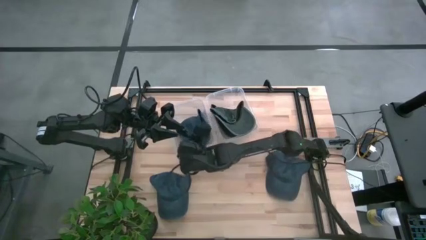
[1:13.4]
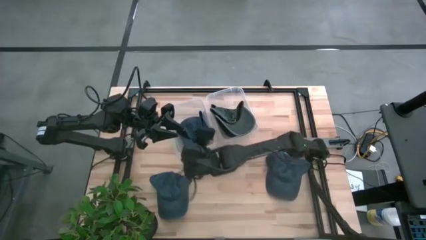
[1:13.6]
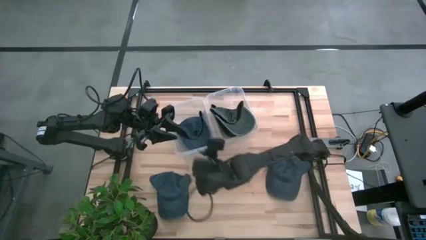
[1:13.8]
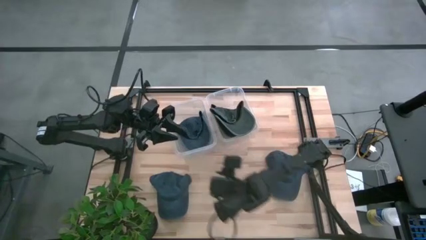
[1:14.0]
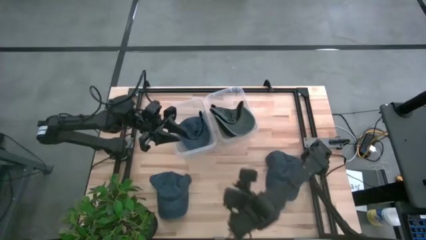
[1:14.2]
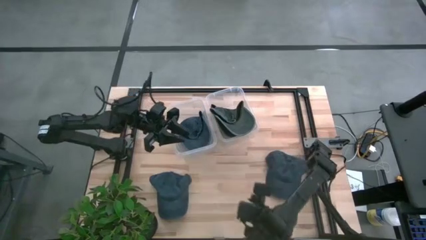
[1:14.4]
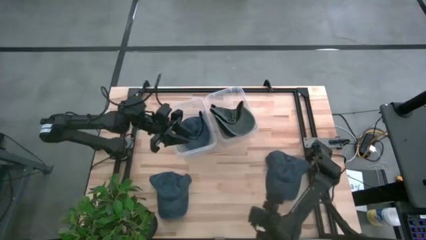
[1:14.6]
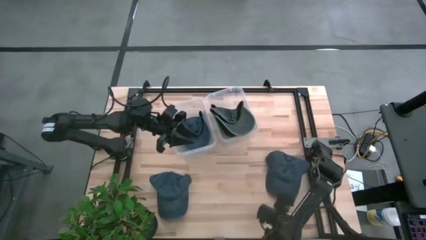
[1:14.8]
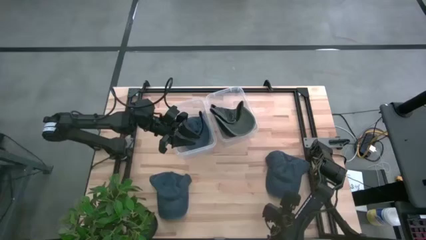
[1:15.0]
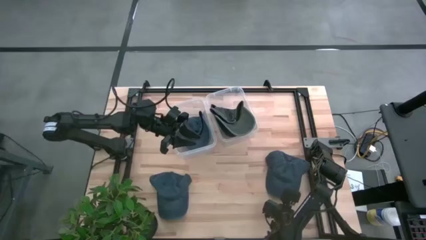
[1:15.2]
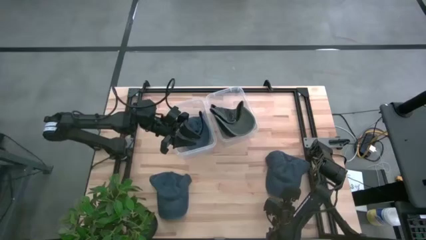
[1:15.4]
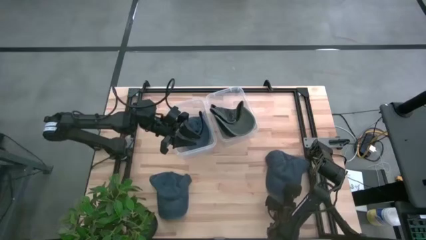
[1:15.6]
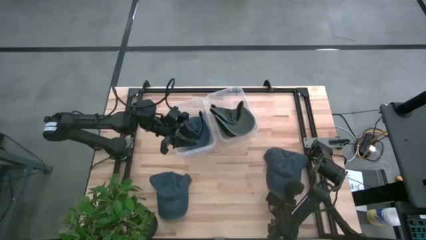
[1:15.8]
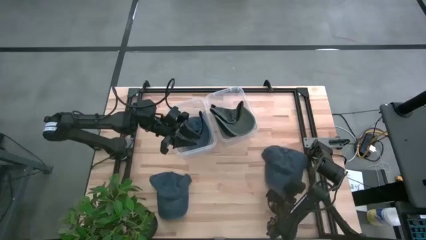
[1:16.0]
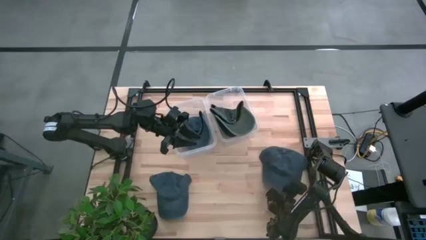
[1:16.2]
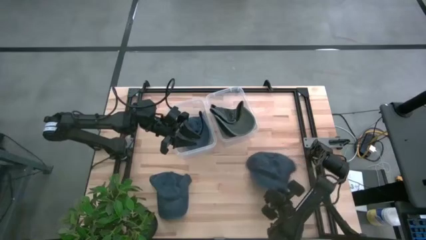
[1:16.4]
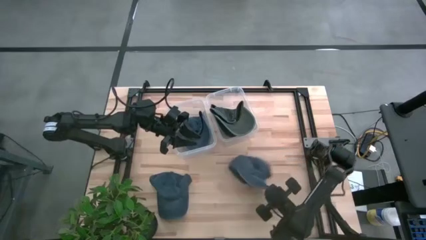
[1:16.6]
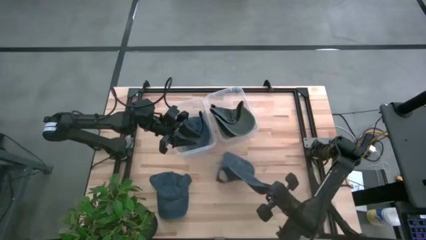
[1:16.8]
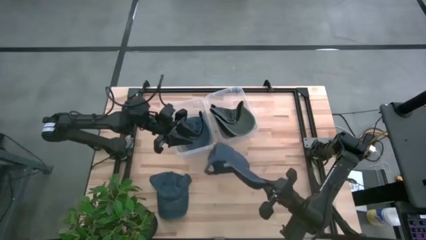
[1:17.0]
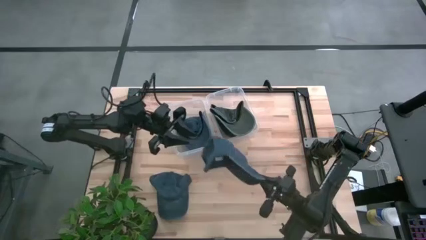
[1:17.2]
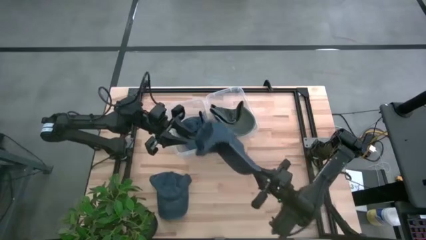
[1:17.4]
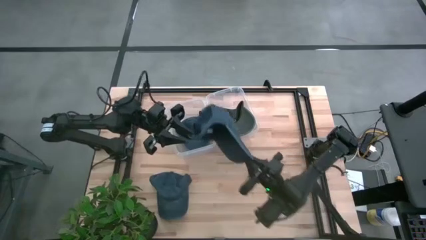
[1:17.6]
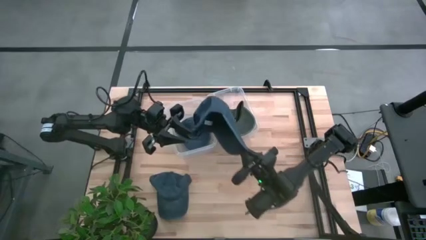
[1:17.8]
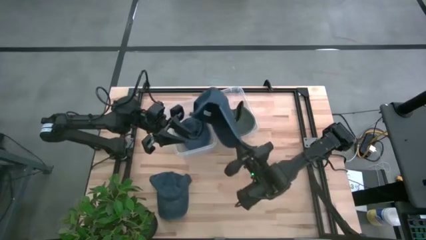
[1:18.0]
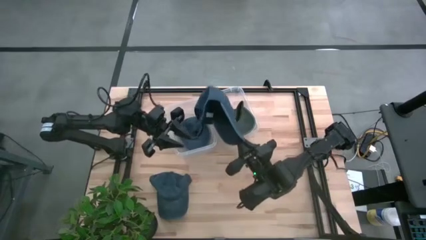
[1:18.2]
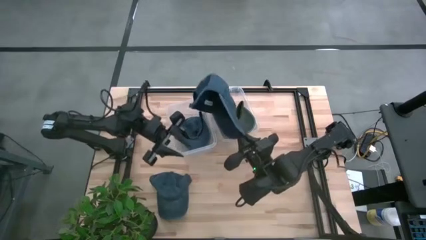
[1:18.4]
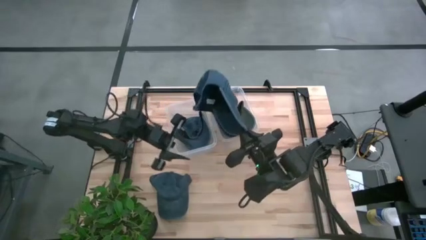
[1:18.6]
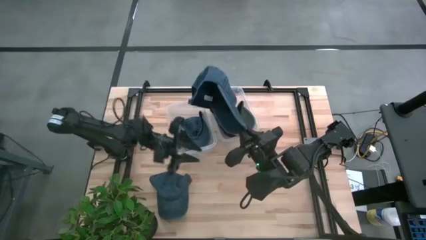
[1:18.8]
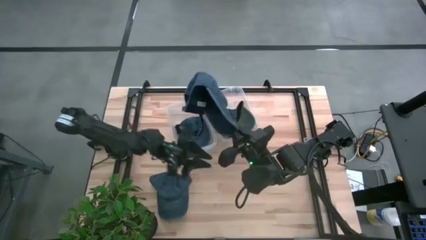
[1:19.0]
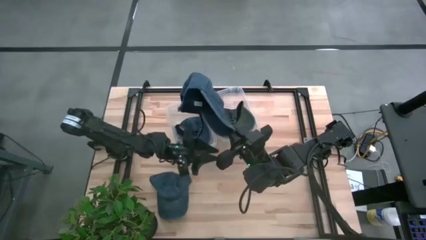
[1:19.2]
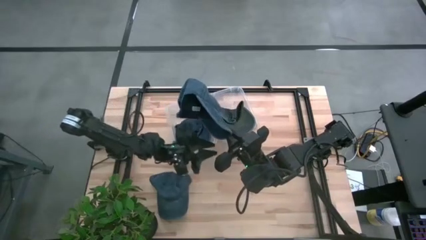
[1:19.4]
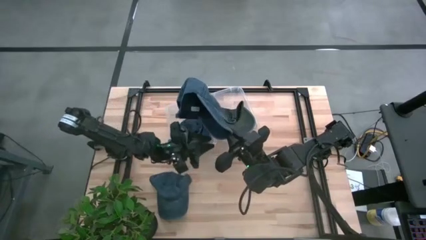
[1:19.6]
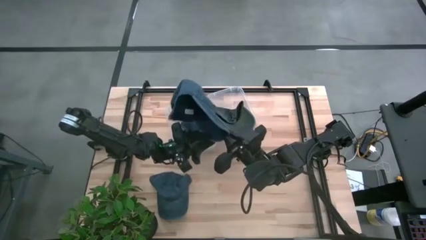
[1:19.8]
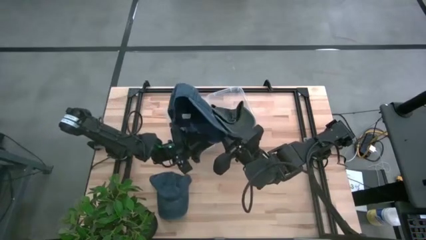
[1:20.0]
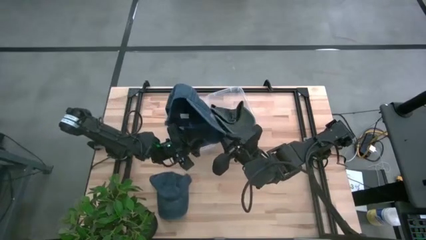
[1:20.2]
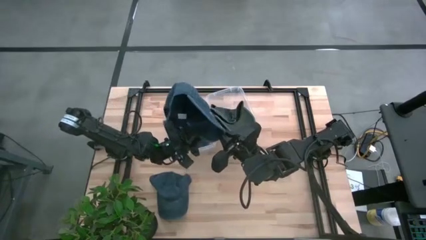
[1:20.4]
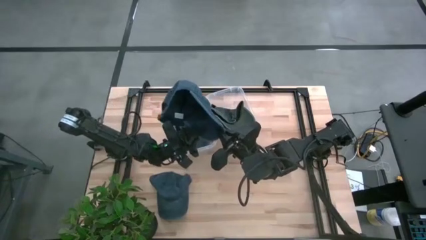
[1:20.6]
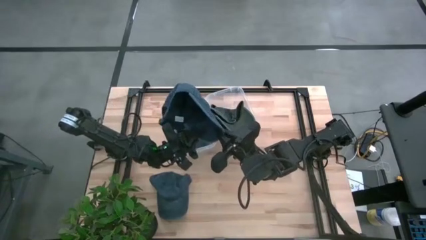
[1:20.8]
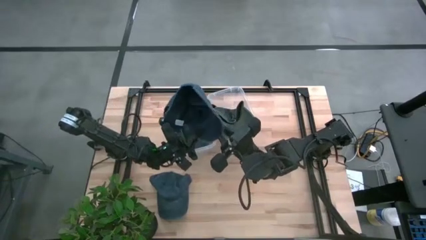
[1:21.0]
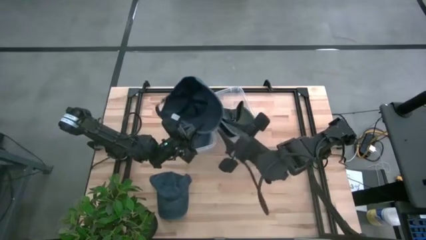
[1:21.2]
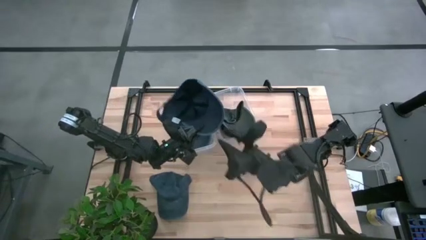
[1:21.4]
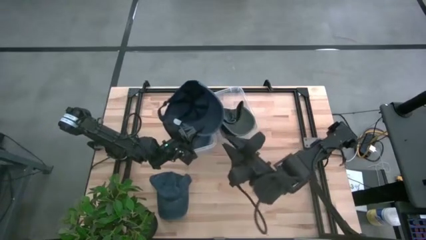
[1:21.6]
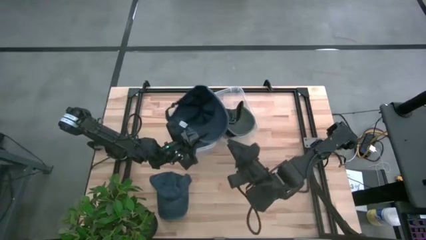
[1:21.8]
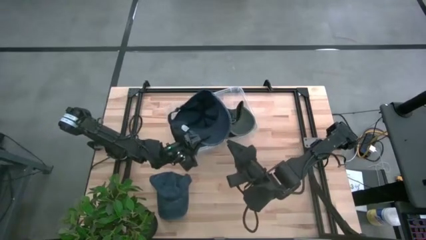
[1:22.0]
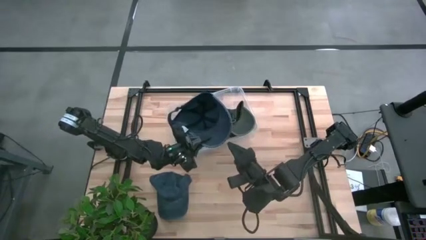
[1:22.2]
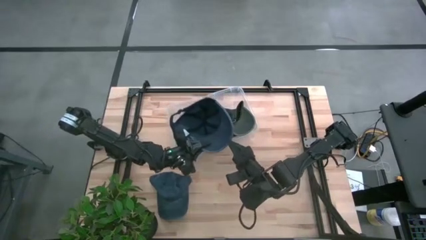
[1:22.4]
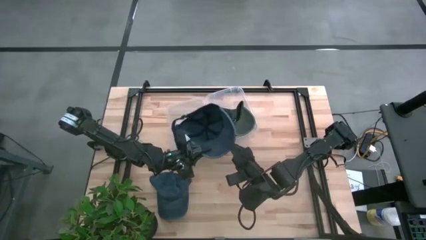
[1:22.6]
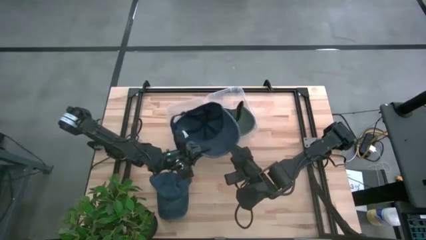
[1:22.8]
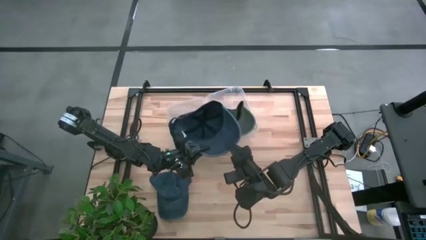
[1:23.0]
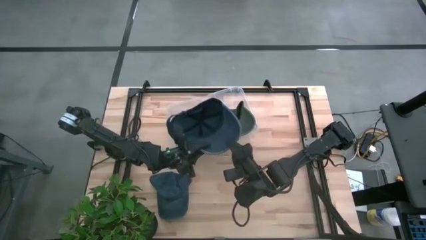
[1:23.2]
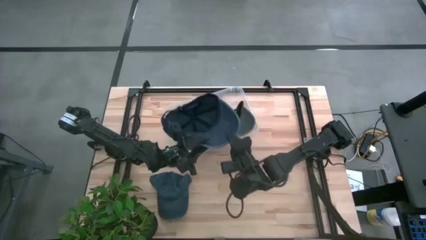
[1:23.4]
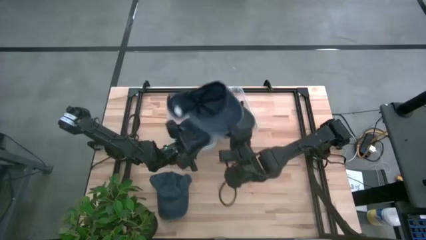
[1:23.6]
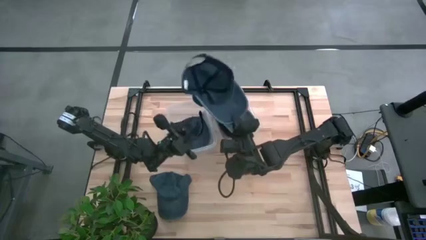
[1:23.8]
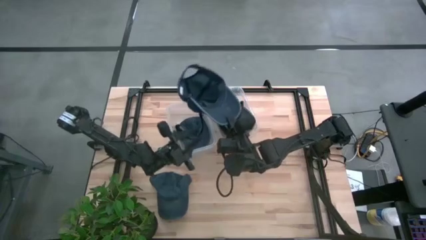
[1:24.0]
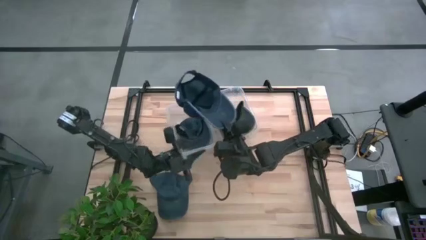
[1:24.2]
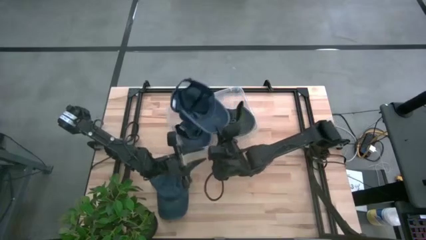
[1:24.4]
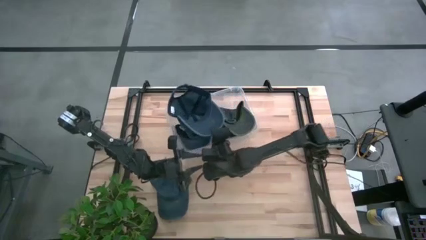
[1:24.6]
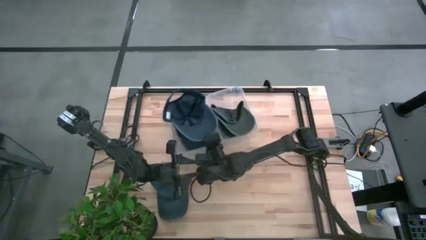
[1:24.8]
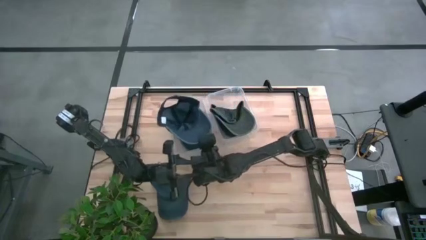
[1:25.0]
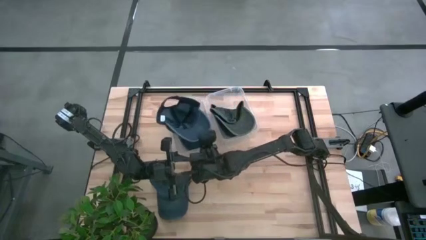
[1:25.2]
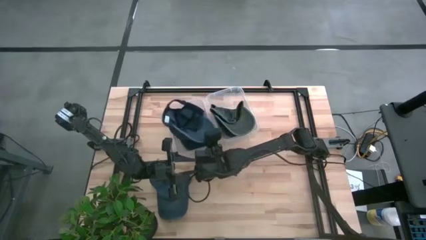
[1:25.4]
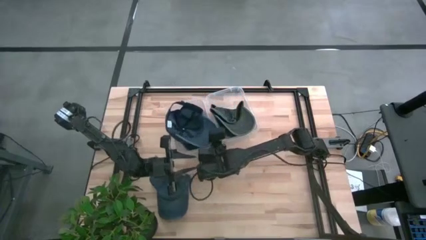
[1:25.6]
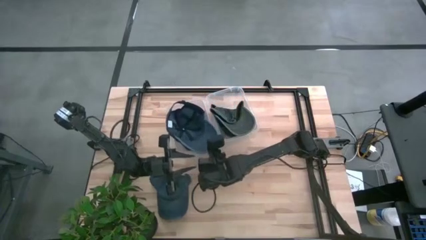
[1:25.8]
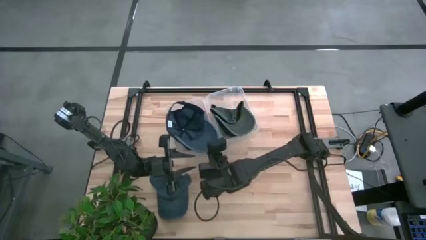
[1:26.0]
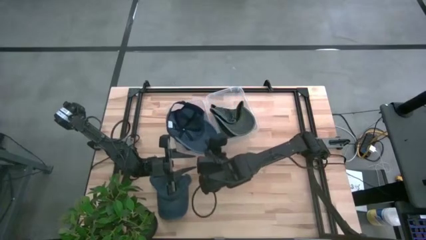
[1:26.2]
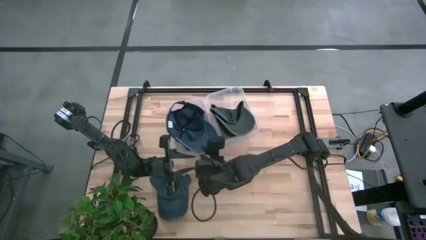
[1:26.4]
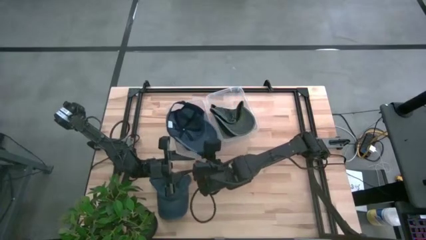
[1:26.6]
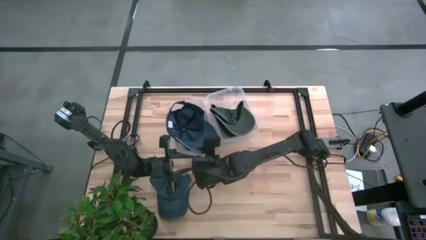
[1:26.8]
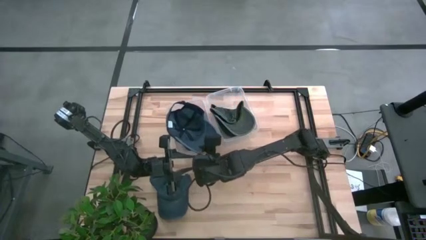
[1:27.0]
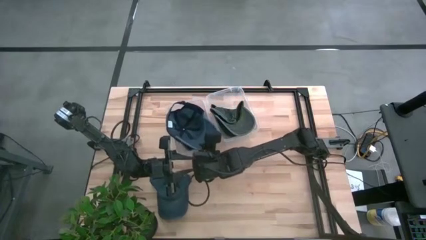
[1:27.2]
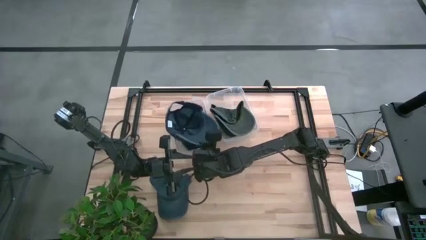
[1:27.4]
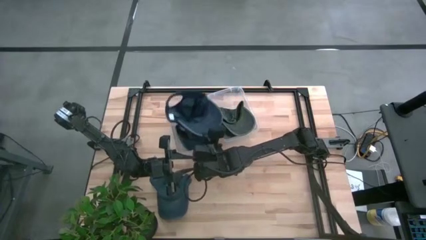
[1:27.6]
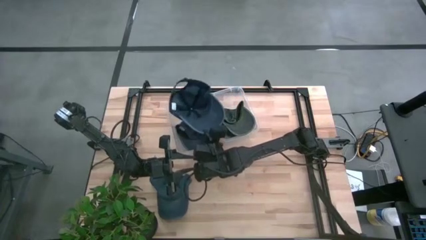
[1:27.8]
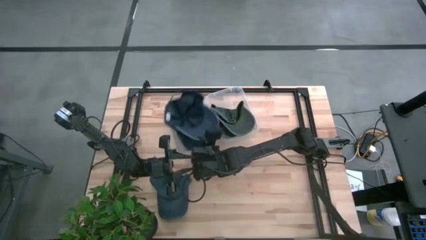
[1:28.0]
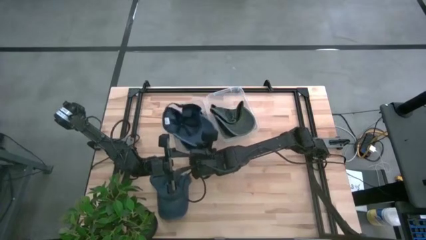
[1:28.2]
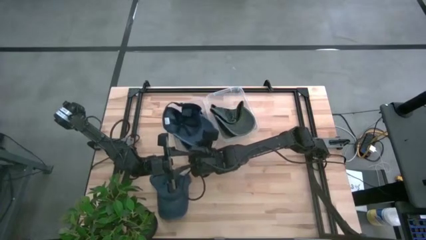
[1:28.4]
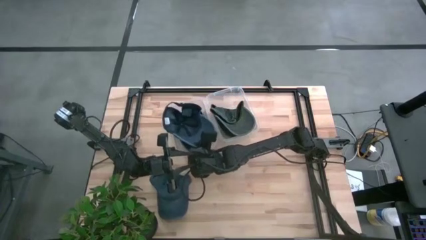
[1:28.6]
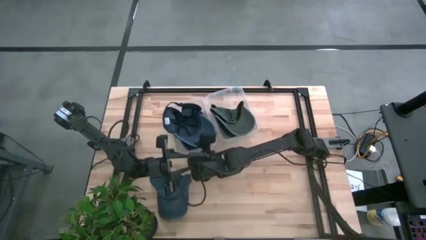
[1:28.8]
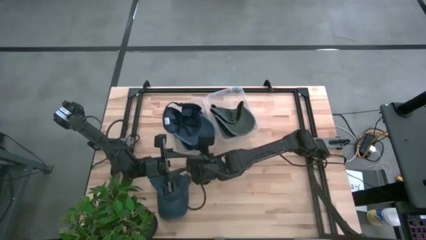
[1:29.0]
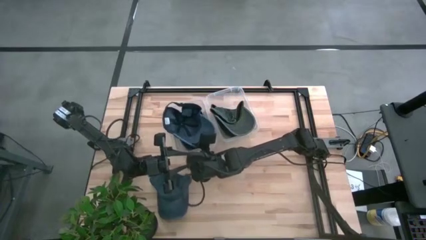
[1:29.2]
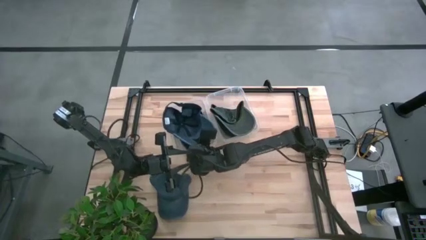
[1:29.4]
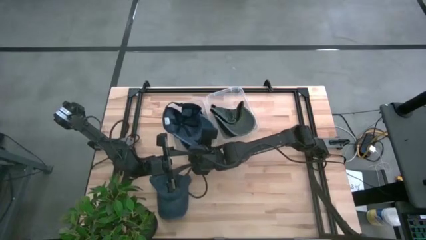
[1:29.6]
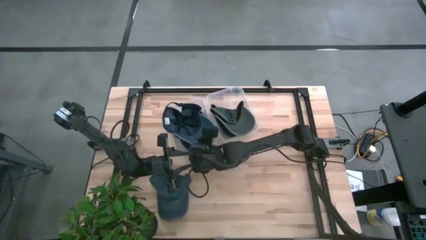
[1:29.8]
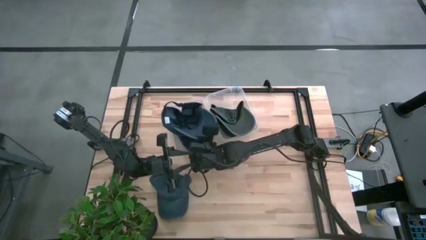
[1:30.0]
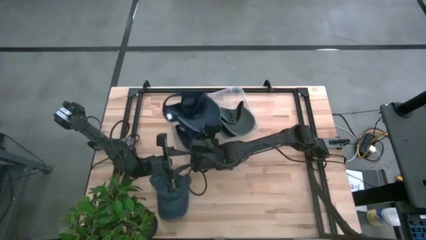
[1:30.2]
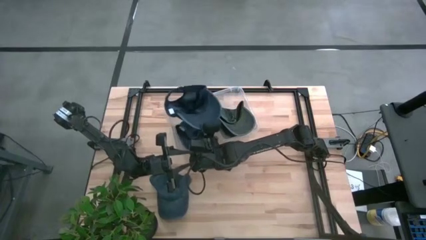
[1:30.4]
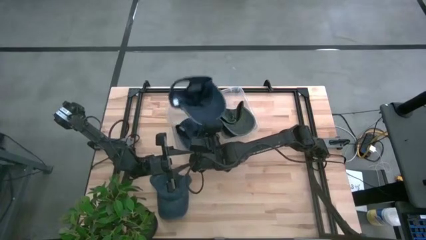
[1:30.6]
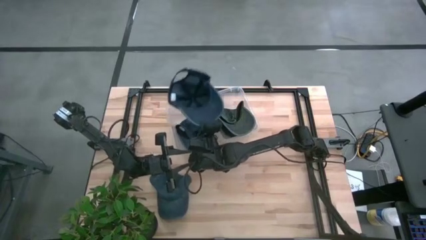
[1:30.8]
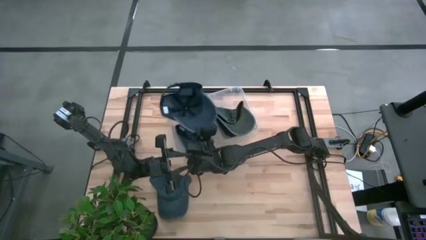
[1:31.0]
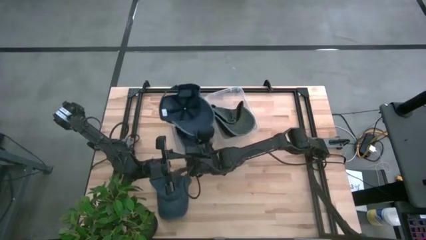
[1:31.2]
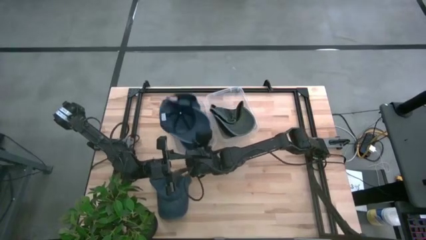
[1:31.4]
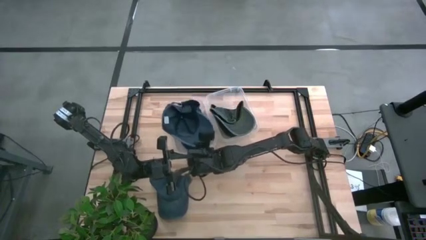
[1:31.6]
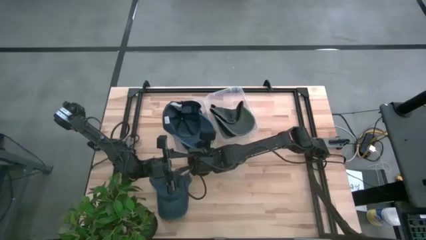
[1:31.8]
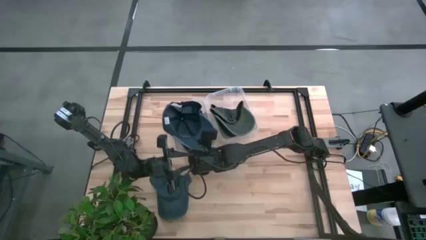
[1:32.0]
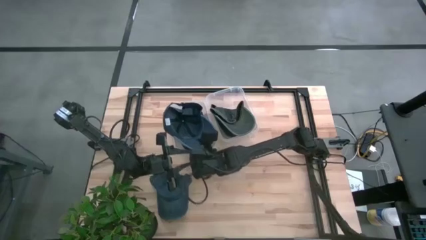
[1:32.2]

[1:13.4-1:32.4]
Task: Pick & Place hat
Put the right dark blue cap into the left transparent bin
